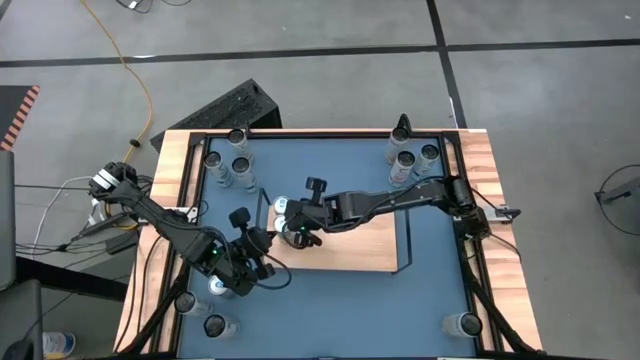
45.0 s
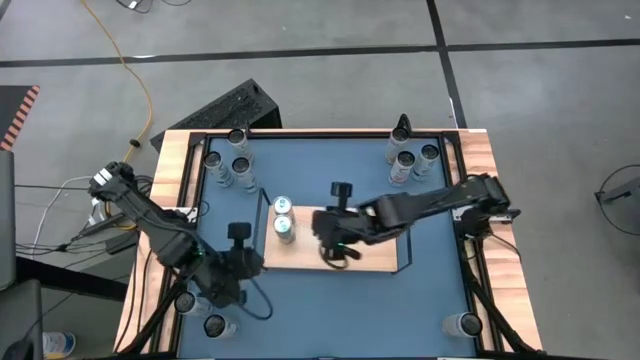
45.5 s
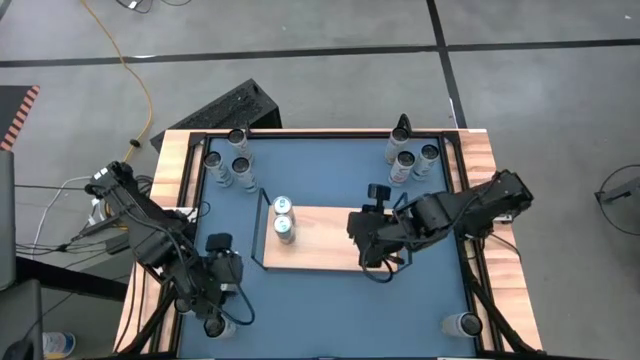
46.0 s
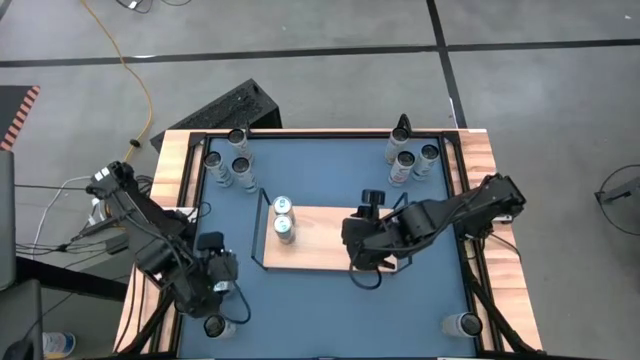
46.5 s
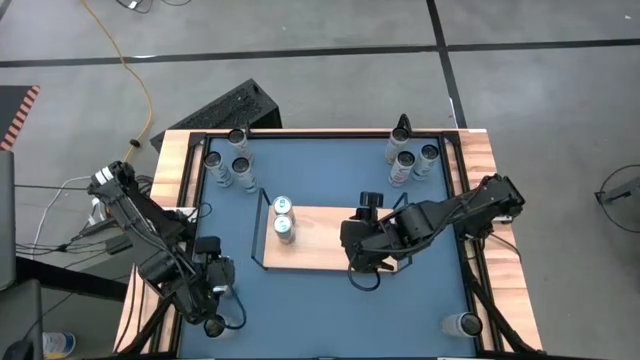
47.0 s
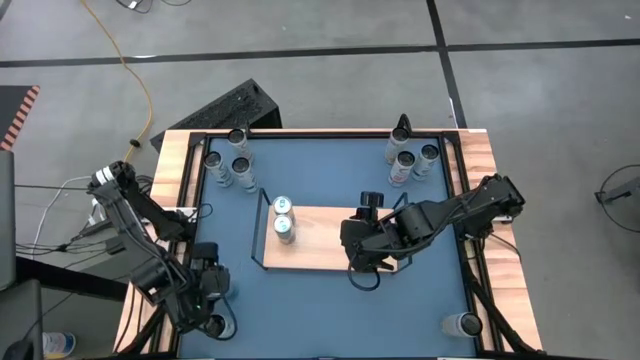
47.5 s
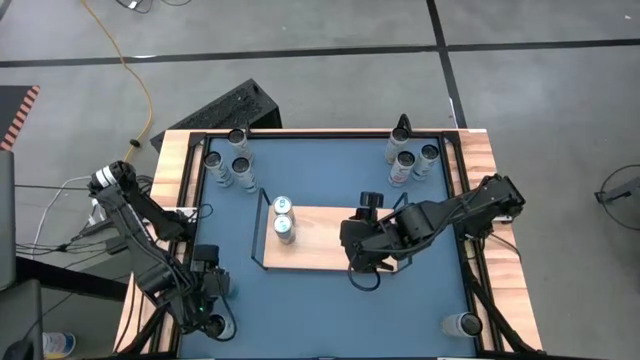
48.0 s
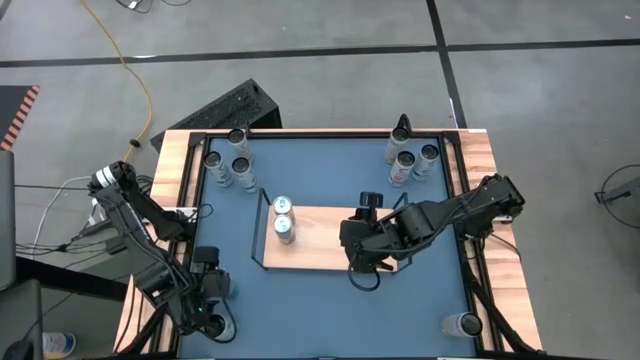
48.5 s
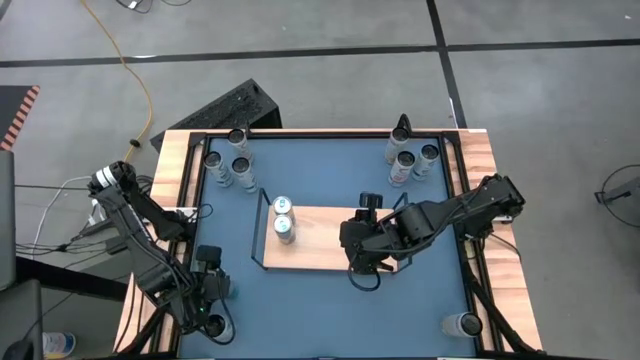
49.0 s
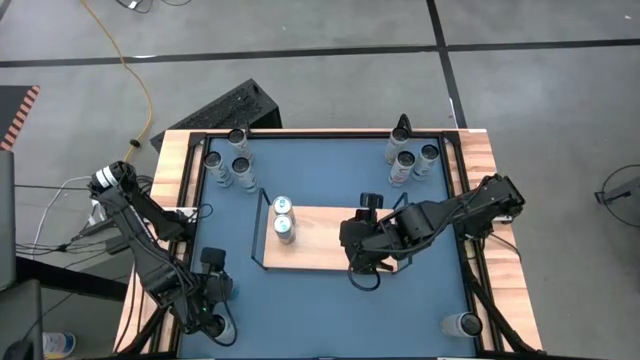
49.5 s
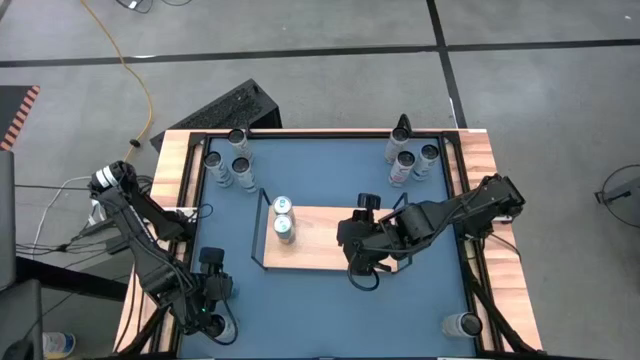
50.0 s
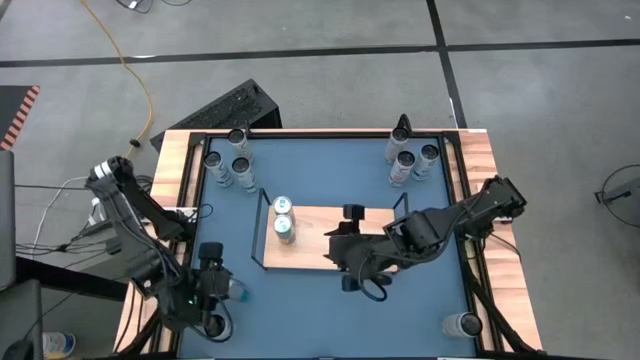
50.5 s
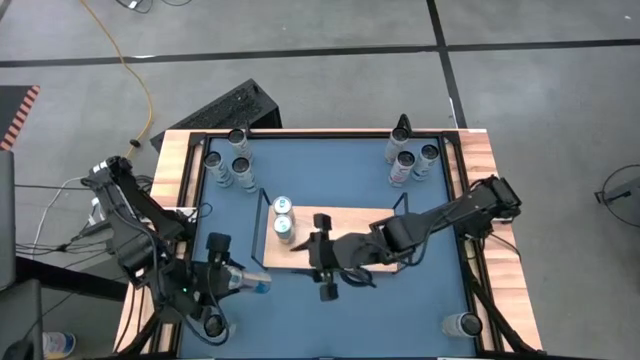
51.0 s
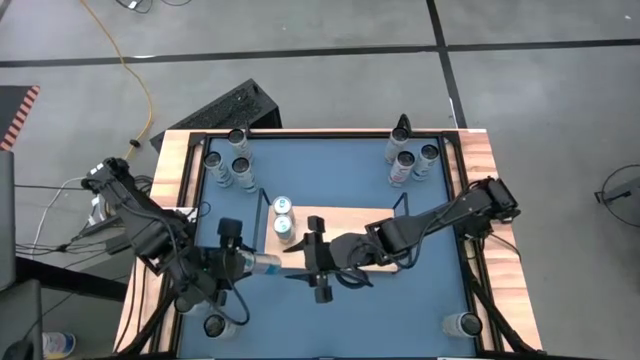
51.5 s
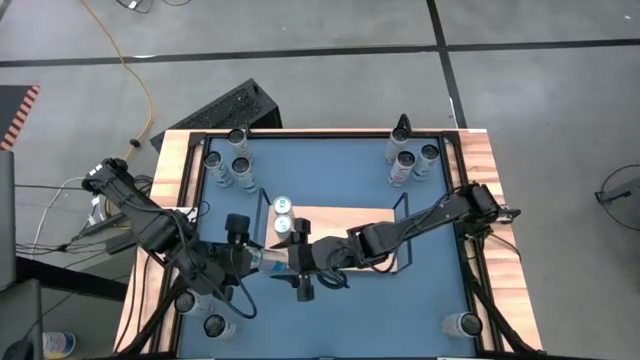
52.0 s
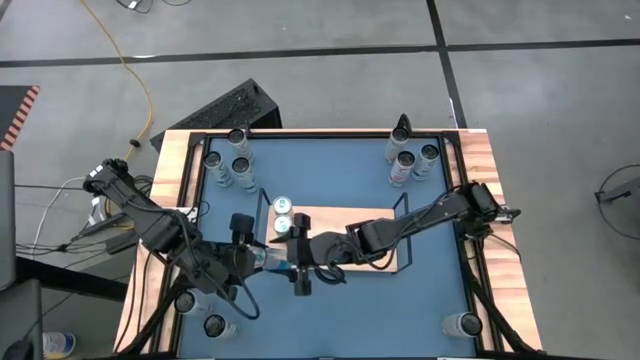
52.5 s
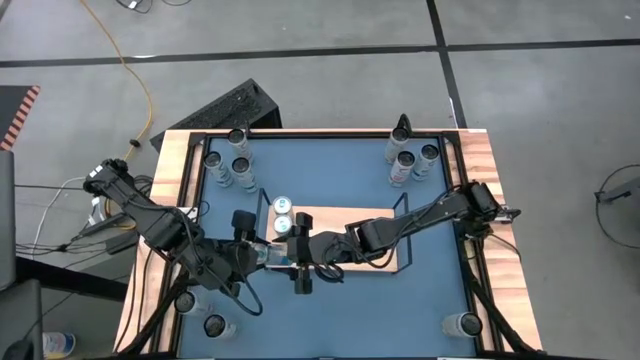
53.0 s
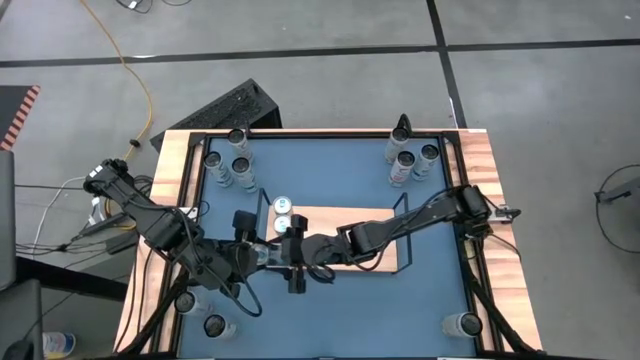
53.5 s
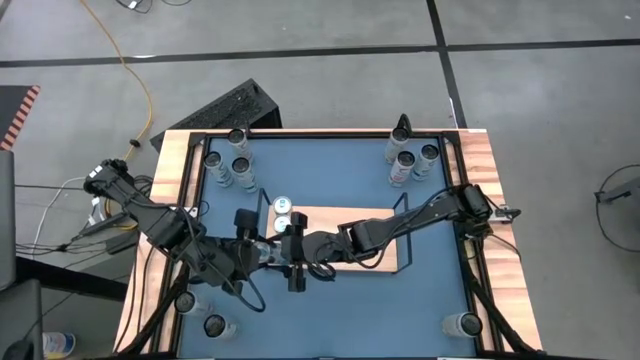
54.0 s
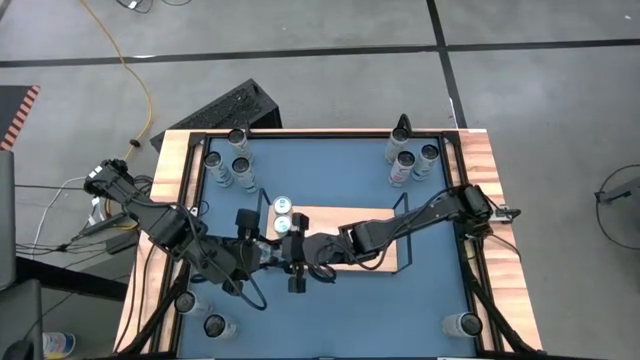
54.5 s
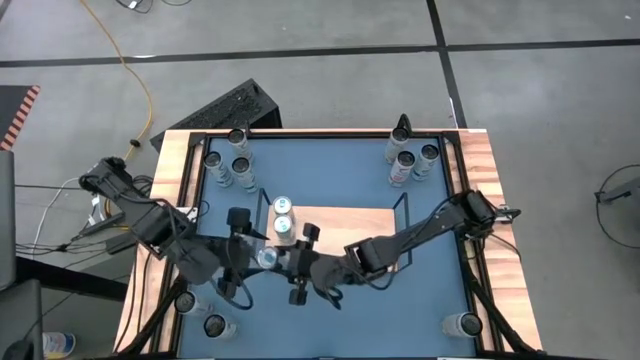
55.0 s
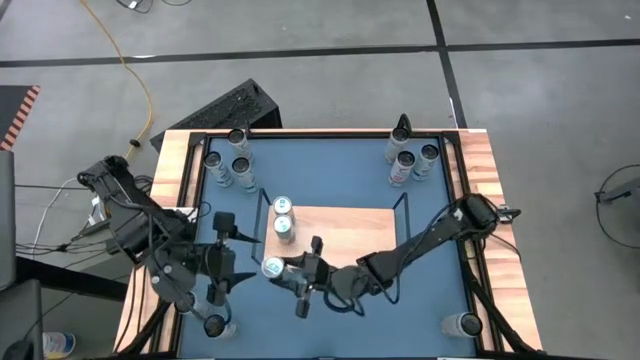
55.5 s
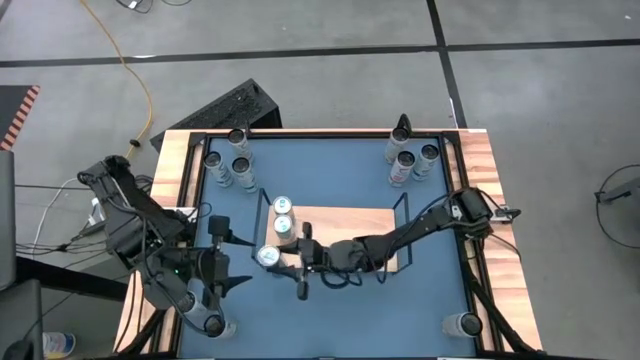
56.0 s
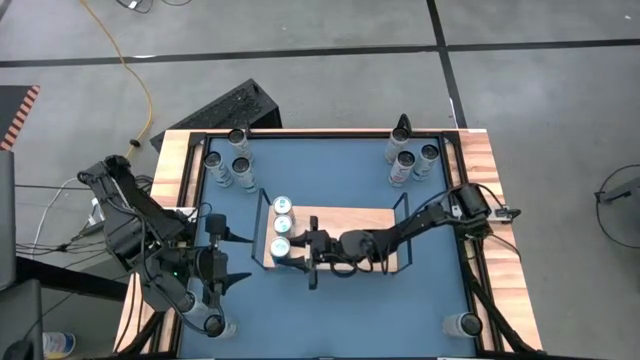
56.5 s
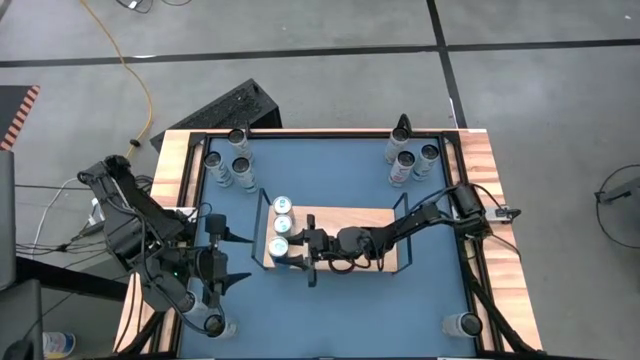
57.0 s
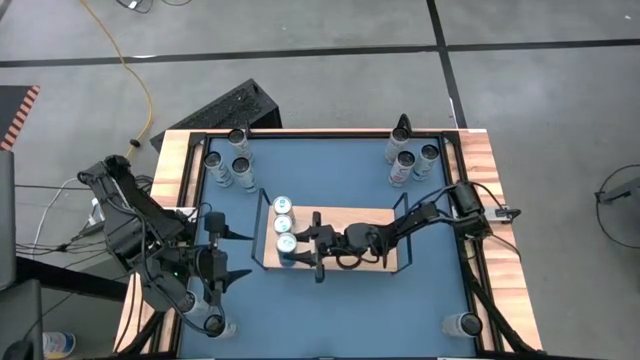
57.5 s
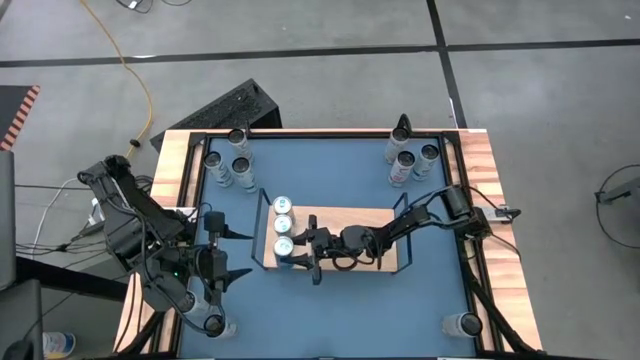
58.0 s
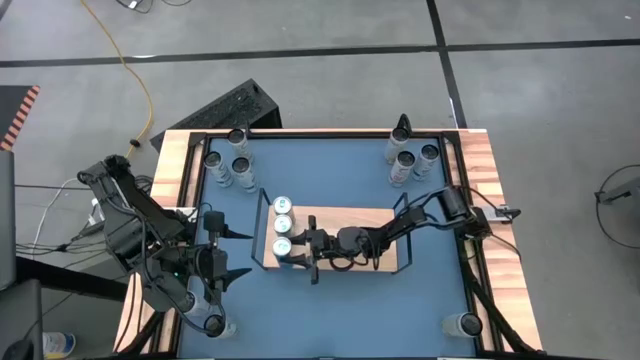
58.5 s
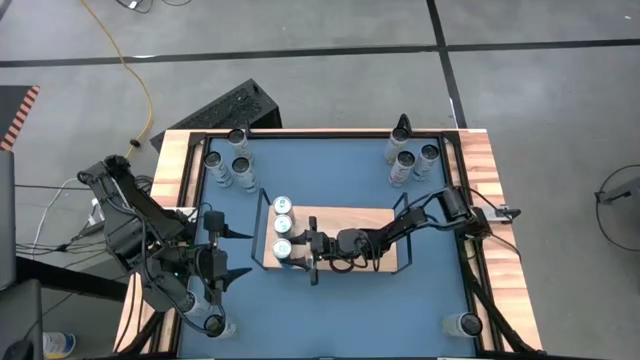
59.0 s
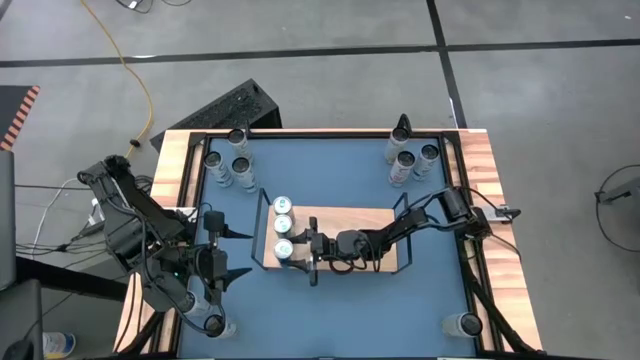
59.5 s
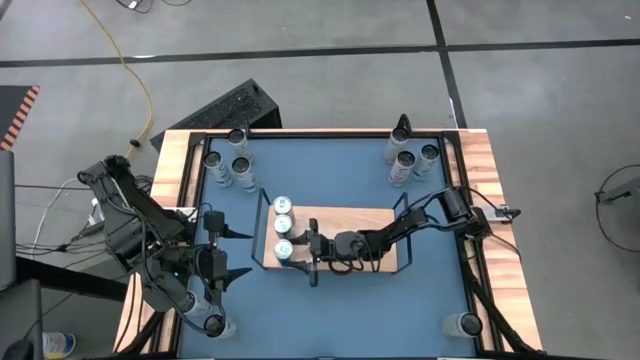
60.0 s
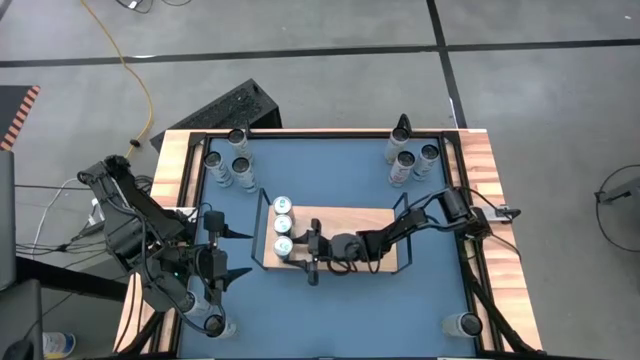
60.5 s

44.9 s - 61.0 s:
Task: Place canned beverage on shelf
Put the blue soda can on the shelf aligned with the other blue soda cans

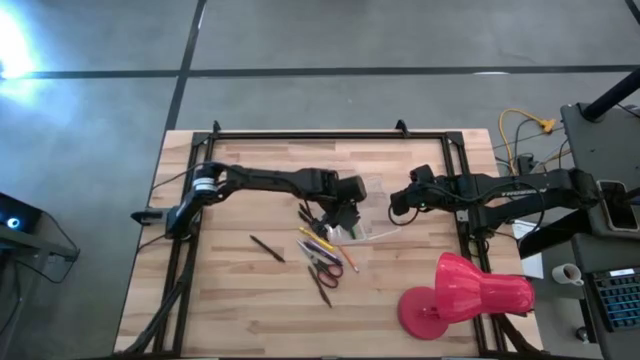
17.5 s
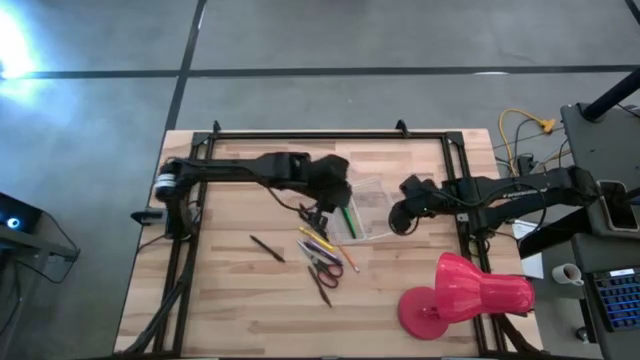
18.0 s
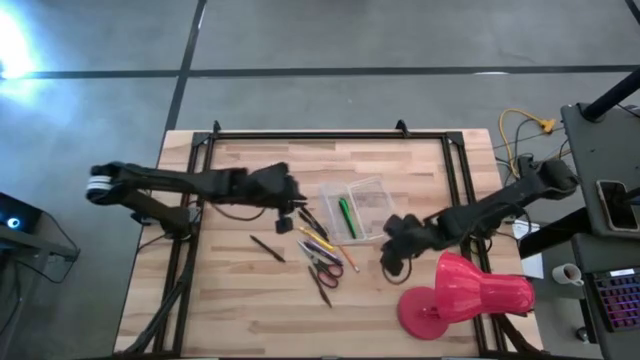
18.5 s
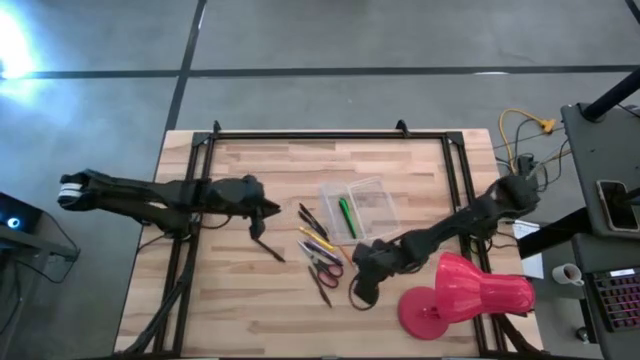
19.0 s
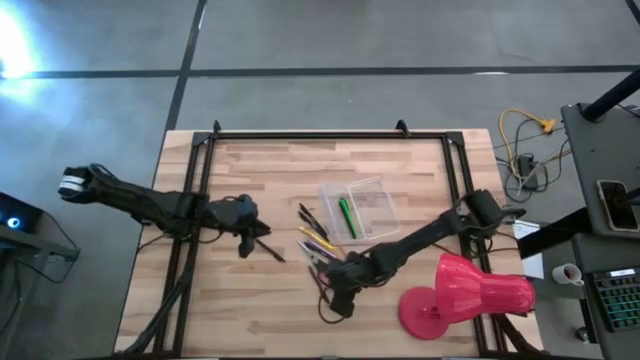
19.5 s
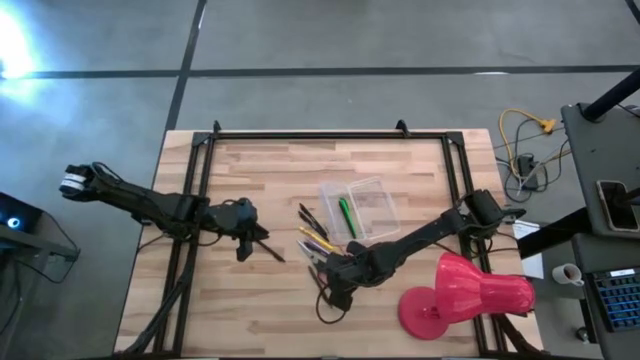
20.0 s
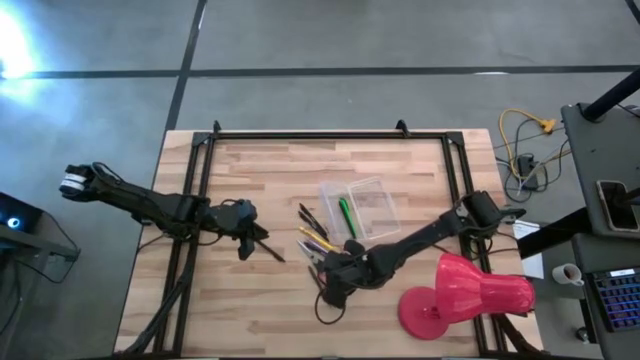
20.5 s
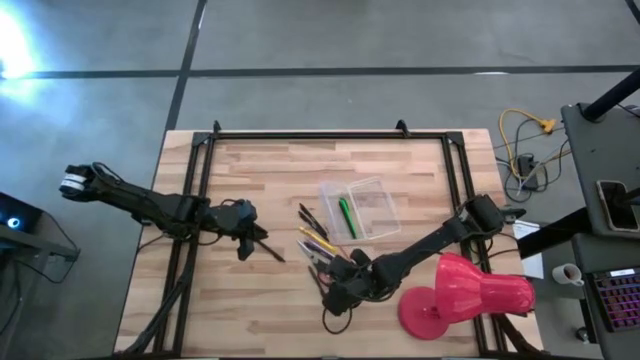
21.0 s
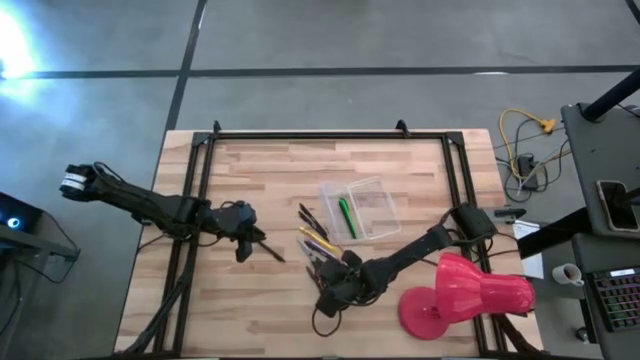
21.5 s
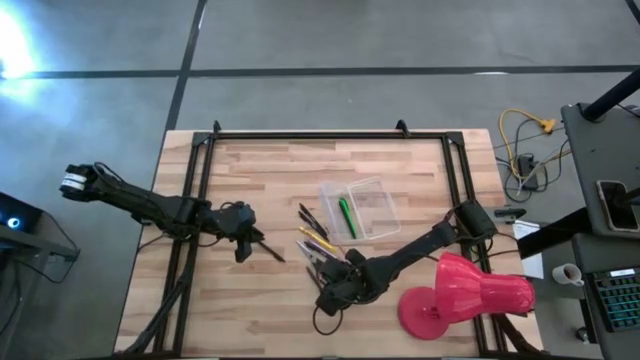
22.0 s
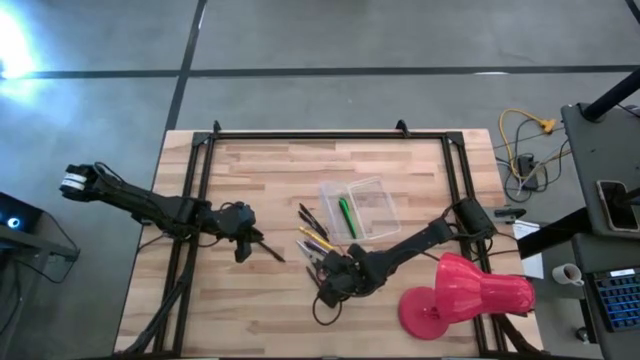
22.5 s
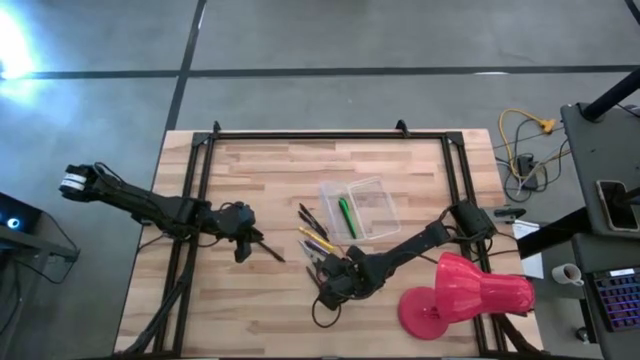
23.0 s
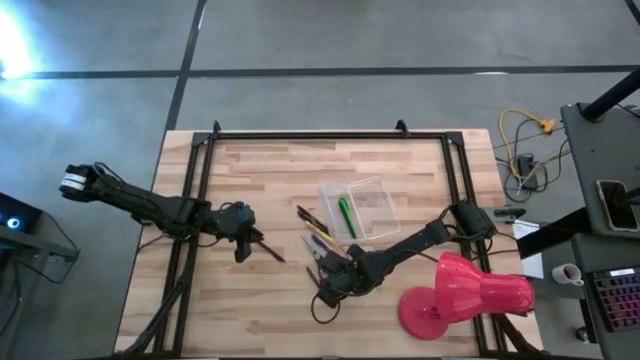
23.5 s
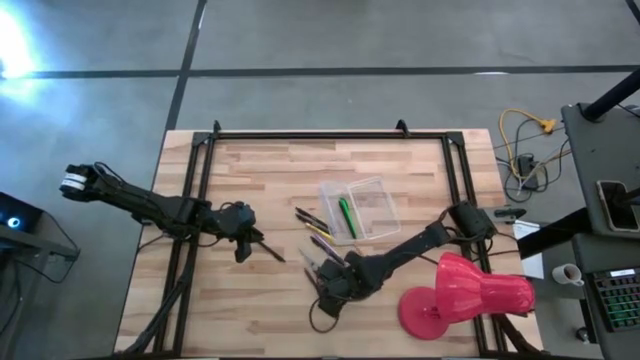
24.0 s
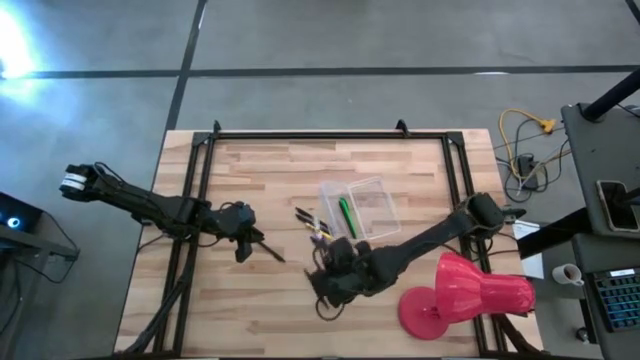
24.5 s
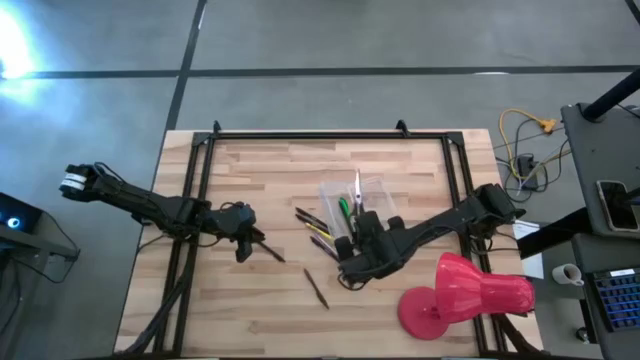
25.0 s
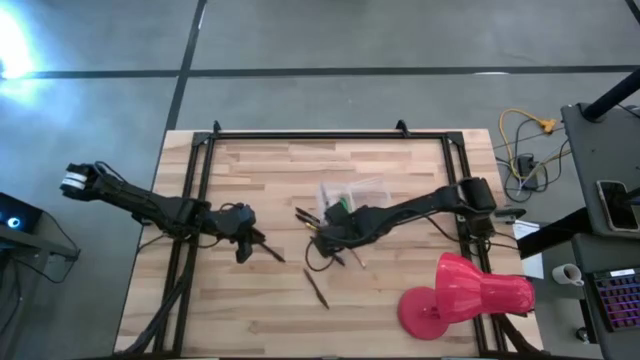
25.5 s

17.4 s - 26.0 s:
Task: Pick & place school supplies into a supply box
Put the black scissors into the transparent supply box
